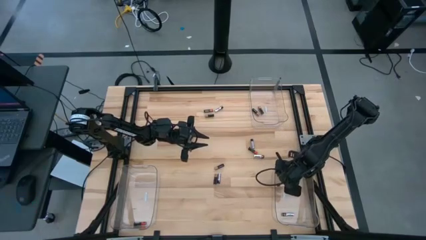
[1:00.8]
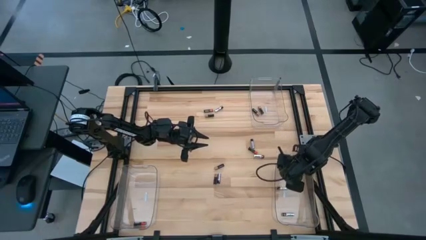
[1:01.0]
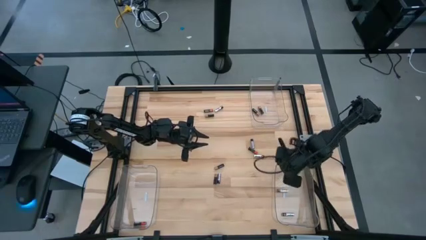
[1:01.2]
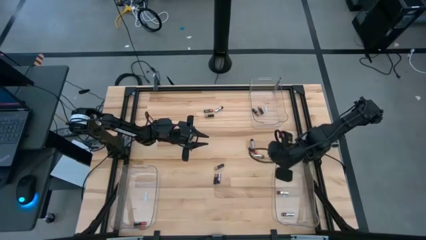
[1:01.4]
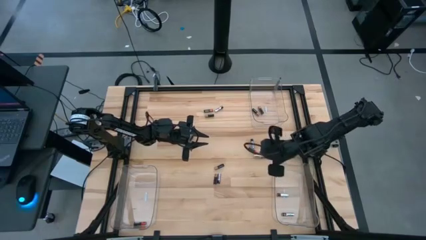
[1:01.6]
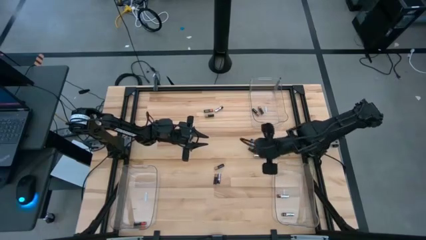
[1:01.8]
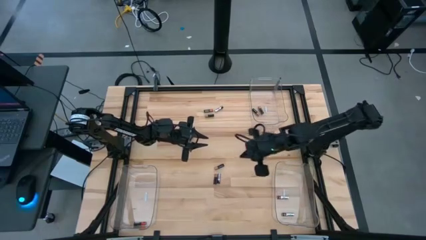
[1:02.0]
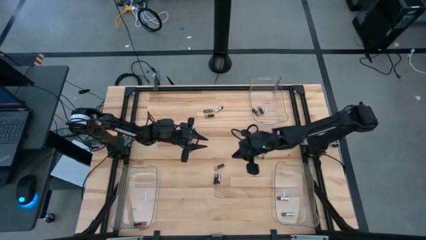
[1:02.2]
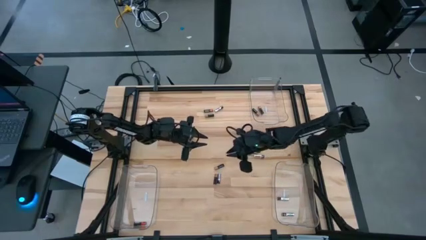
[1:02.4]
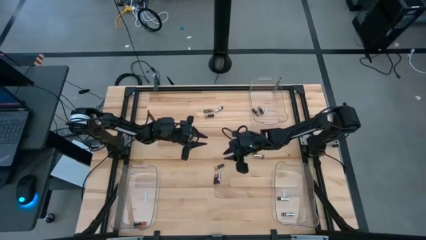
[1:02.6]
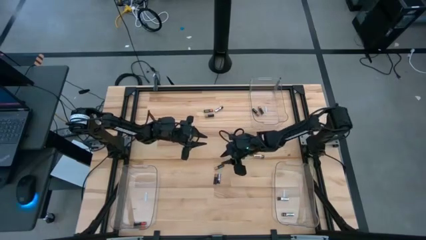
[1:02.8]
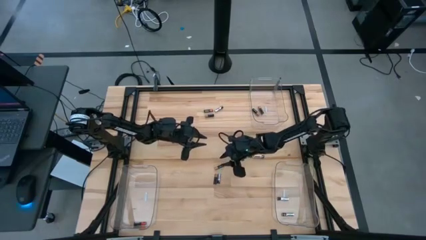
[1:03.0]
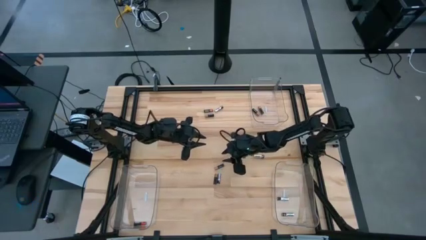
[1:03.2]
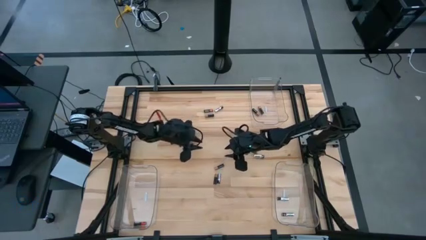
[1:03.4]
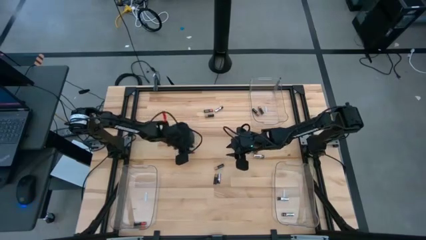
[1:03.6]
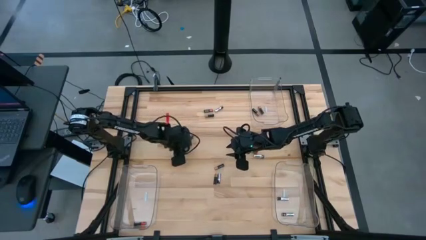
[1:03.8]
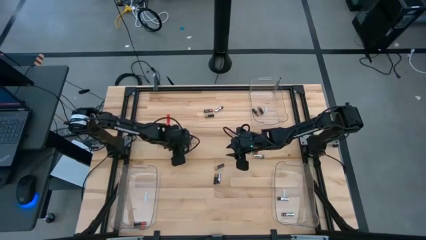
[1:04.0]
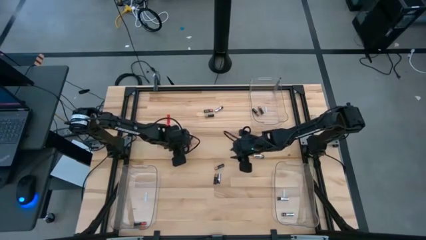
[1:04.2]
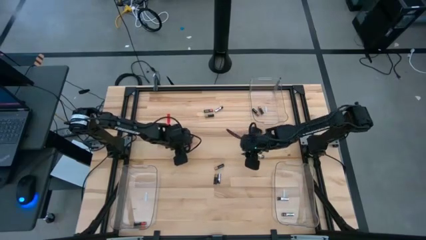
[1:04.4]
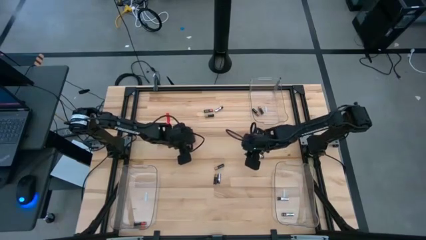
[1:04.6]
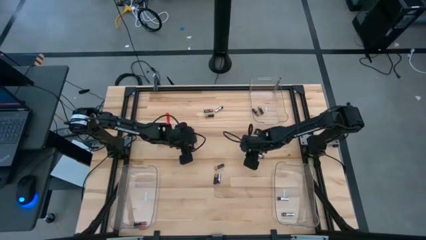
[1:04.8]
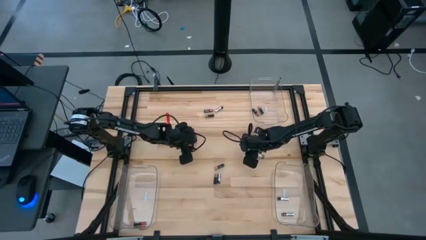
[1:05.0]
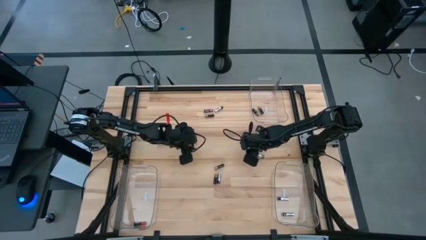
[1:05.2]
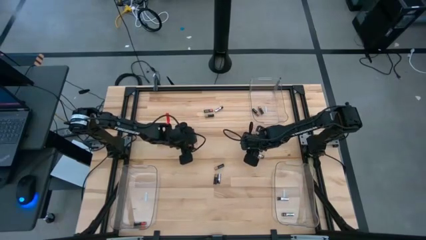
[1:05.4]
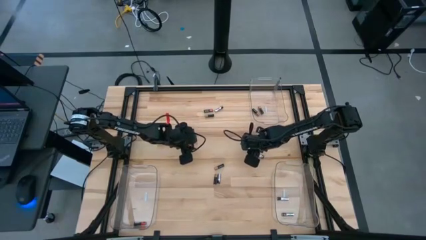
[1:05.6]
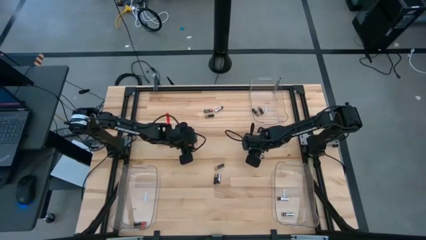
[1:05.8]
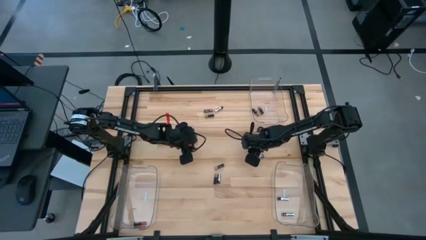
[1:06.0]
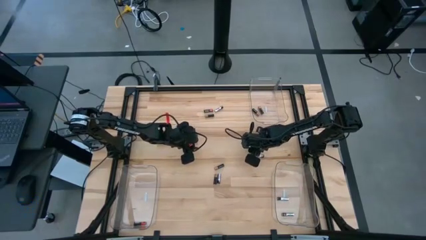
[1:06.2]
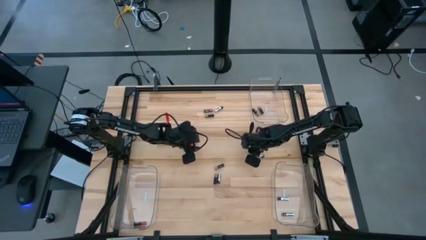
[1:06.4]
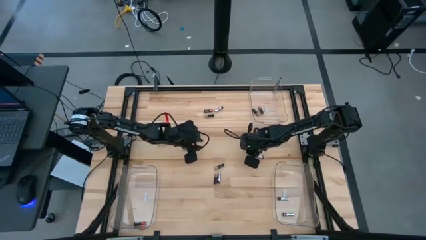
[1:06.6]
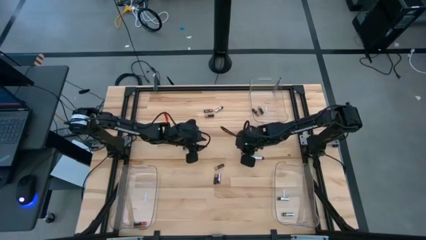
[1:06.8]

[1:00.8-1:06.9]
Task: Sort batteries
Put the orange battery into the bottom left transparent bin

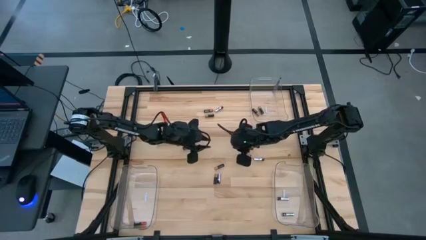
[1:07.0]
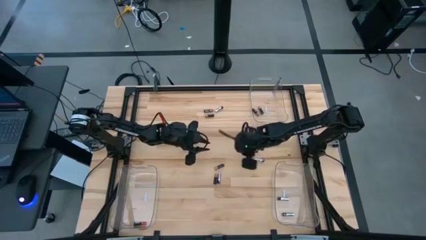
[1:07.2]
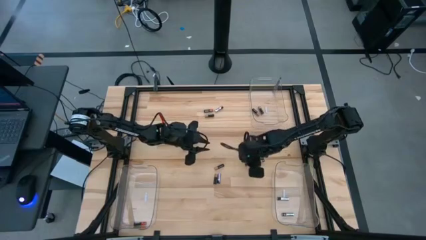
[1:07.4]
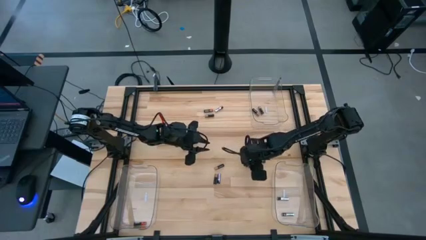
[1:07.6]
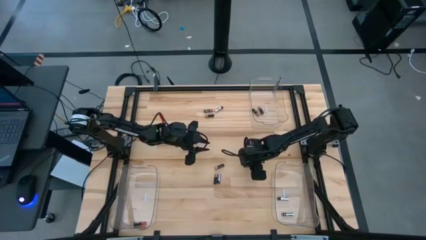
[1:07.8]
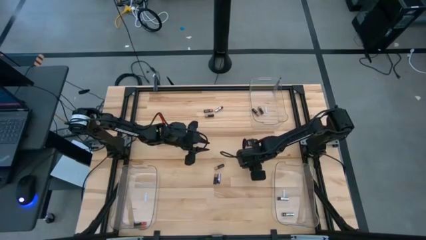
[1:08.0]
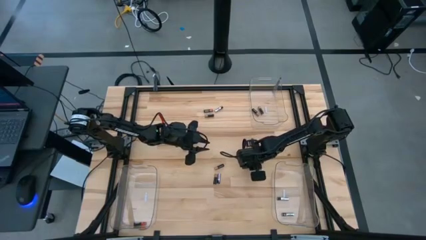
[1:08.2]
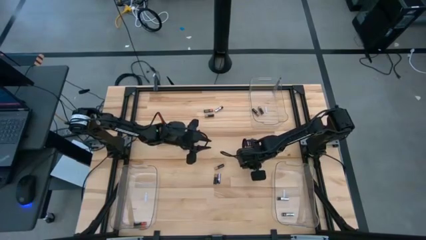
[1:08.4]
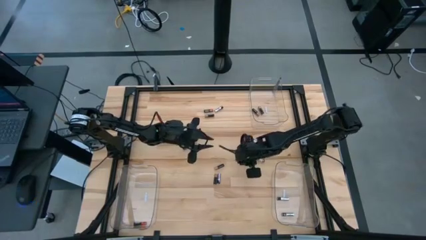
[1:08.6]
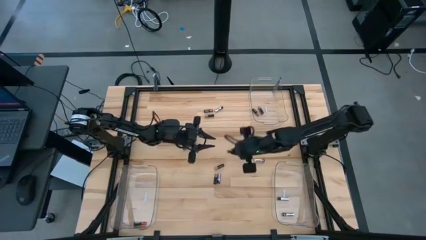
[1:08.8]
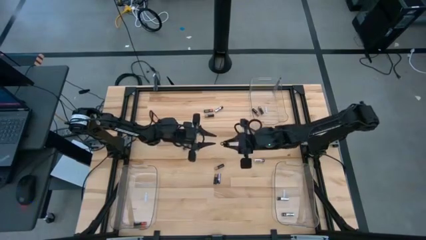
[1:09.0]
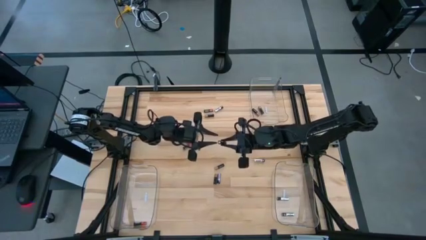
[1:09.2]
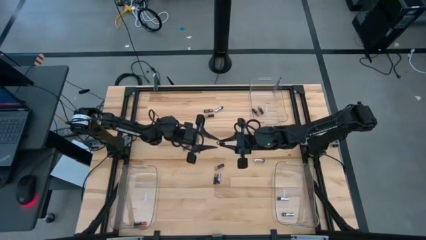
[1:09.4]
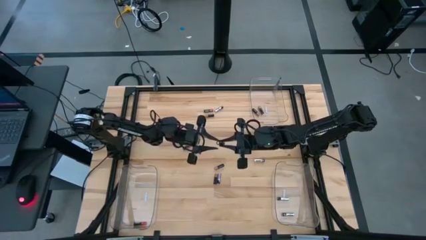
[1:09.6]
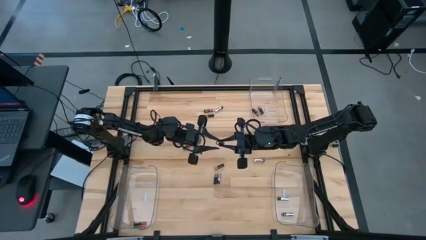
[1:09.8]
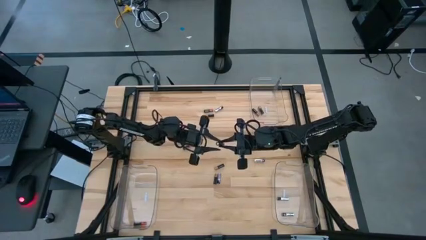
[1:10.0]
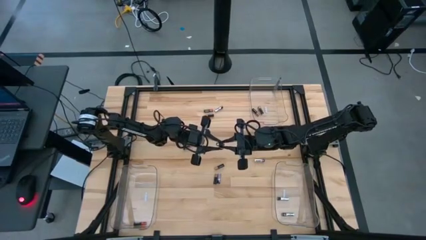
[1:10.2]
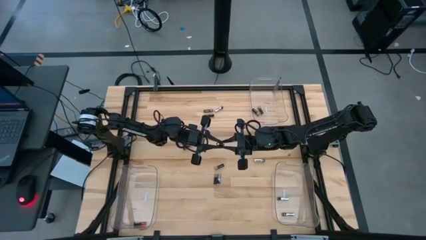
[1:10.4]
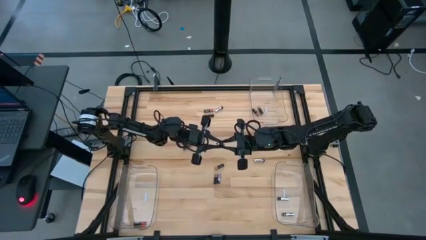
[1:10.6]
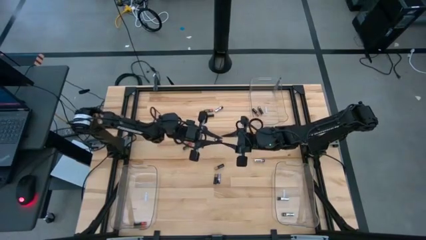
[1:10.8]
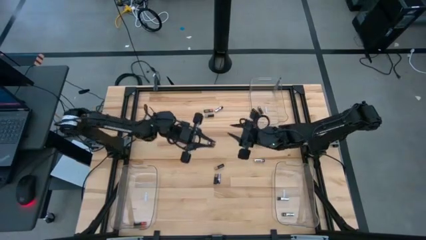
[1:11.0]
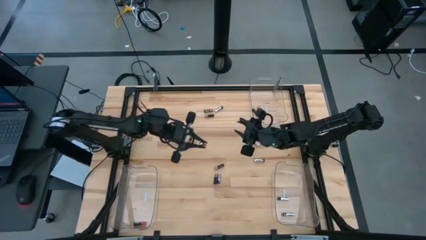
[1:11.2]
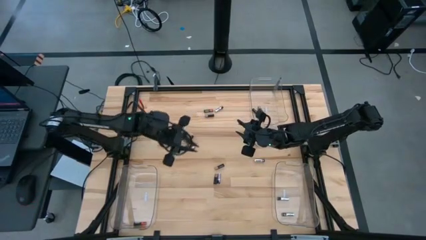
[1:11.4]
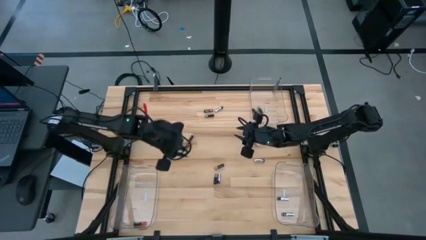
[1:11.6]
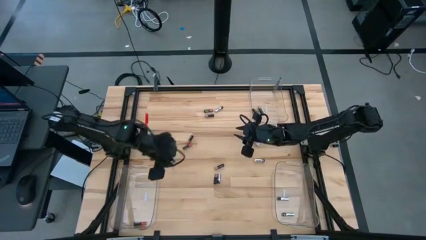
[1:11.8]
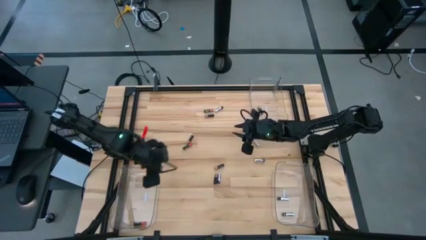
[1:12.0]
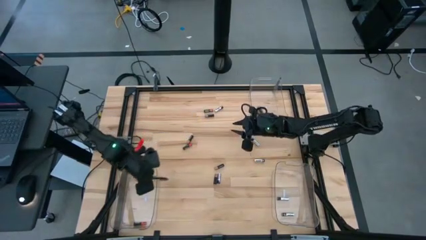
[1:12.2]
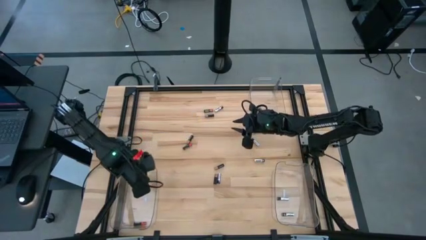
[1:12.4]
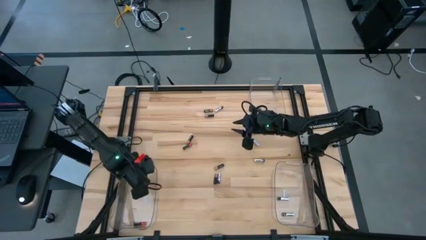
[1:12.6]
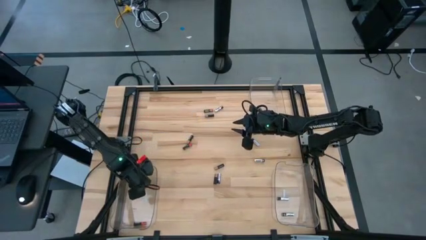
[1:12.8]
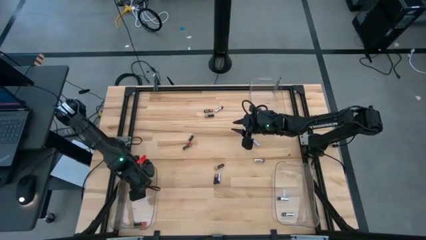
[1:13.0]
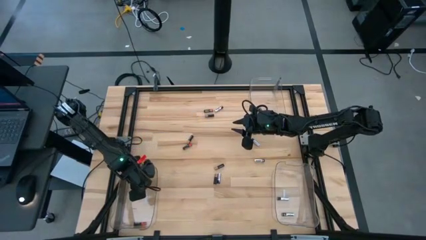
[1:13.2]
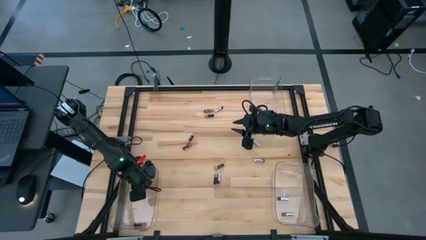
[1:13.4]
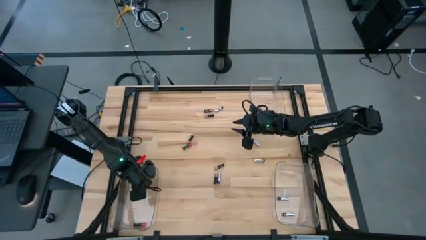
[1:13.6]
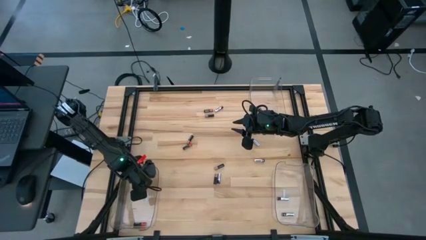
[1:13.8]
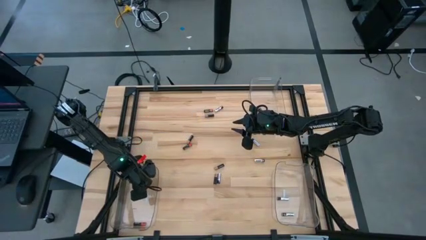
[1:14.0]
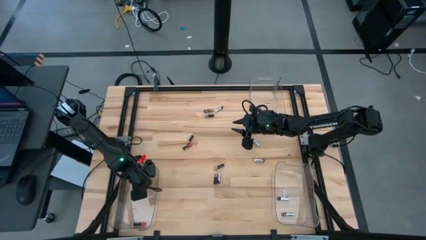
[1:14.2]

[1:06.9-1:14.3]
Put the orange battery into the bottom left transparent bin

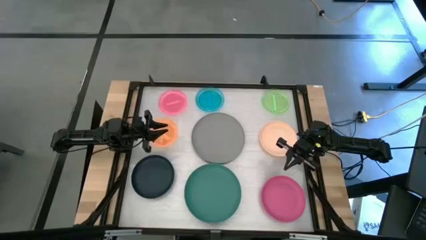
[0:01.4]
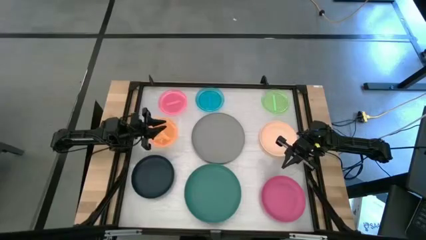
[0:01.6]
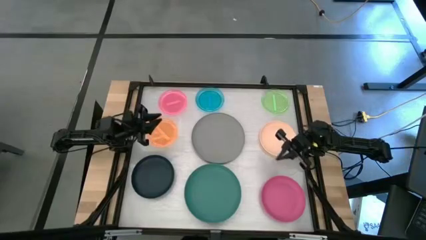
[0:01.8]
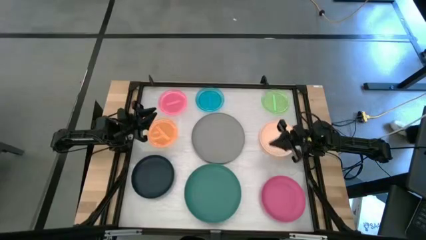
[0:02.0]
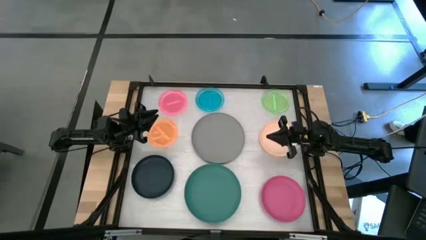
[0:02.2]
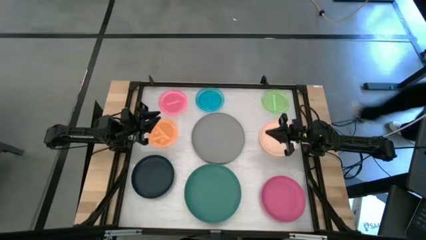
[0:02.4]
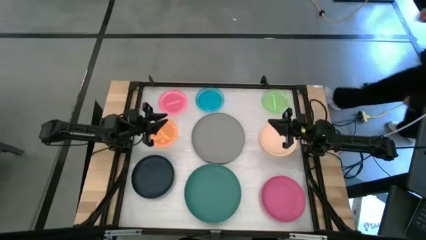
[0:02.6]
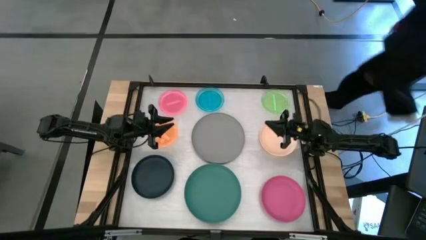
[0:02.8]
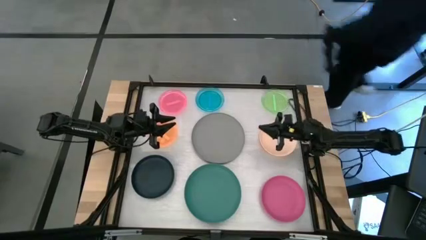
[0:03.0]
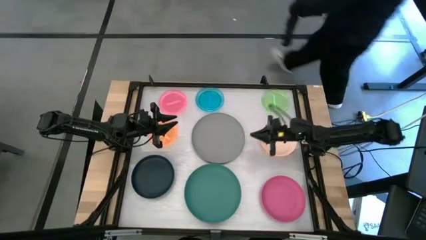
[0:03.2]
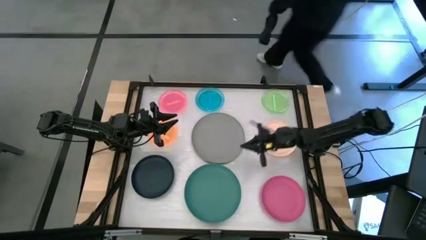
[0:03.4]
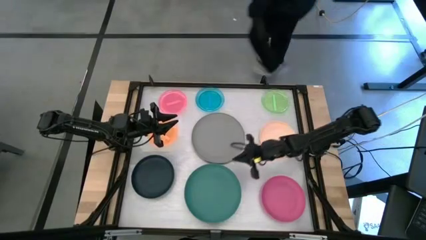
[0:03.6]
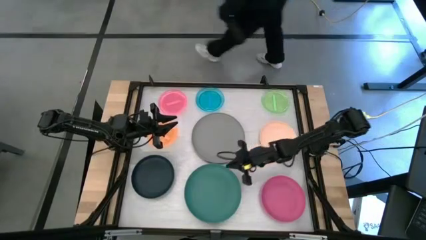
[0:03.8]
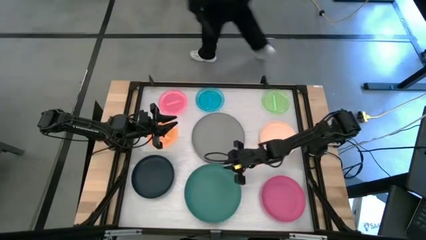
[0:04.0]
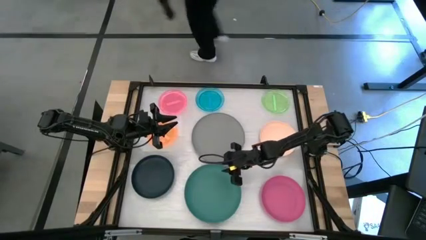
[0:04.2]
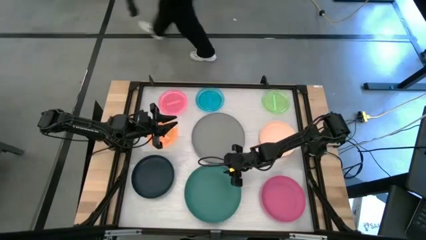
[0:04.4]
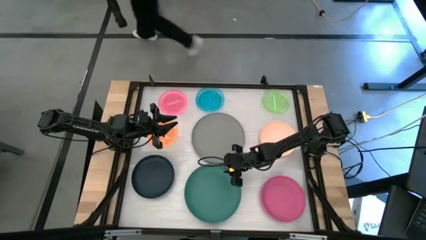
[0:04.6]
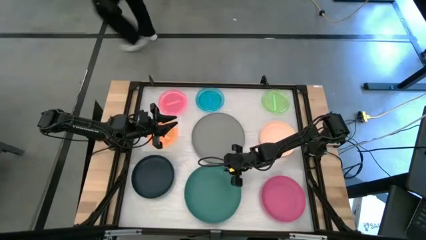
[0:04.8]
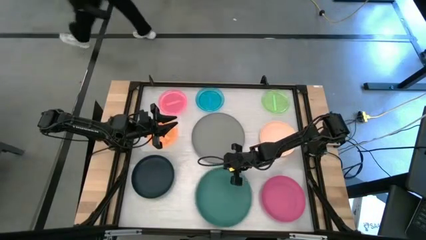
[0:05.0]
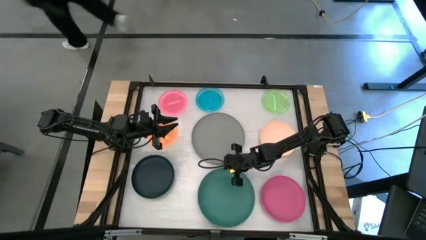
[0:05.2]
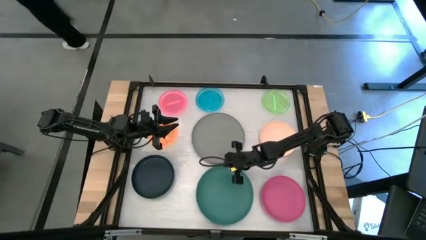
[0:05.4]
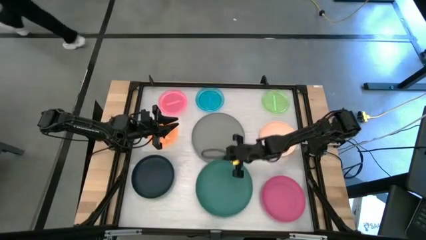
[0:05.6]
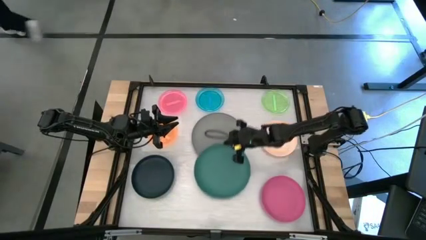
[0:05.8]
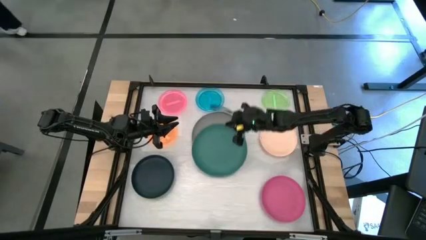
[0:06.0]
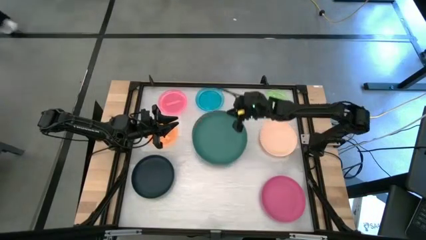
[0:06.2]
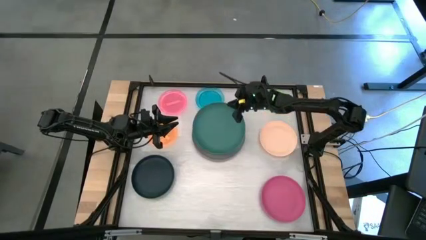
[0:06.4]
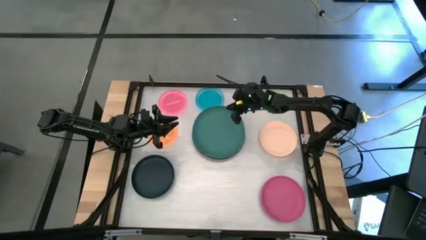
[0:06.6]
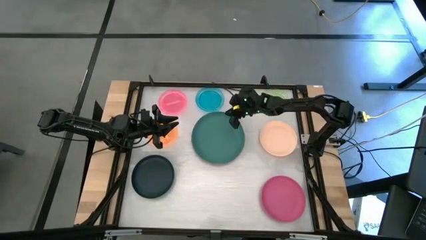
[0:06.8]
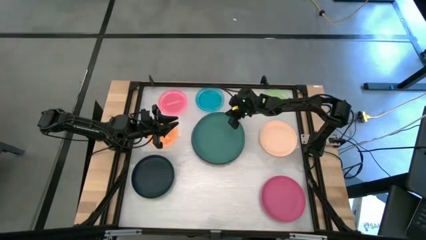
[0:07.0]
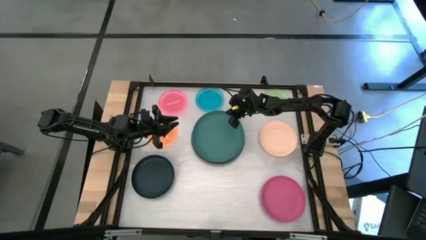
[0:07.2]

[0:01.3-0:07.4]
Task: Stack plastic plates
Stack the green plate on top of the gray plate
